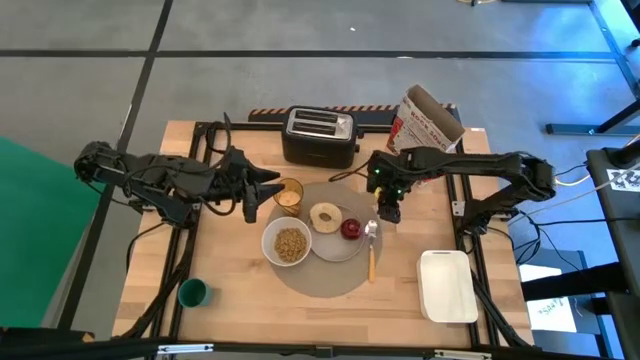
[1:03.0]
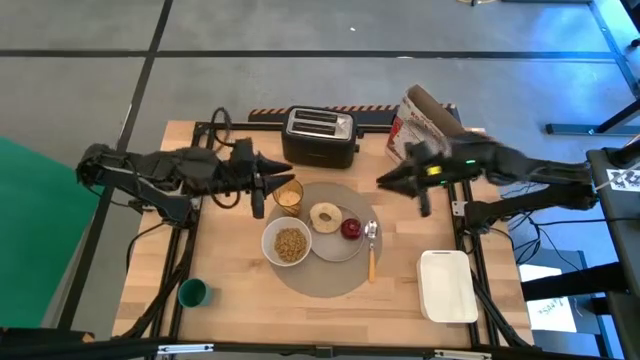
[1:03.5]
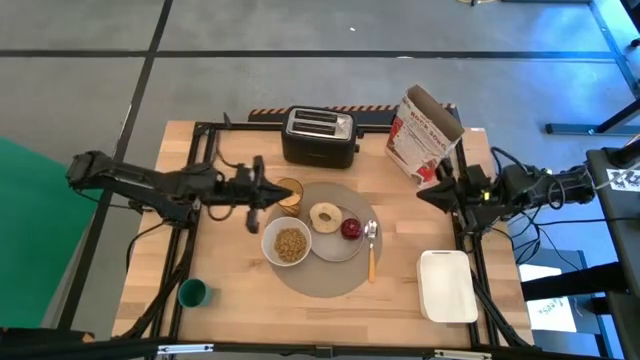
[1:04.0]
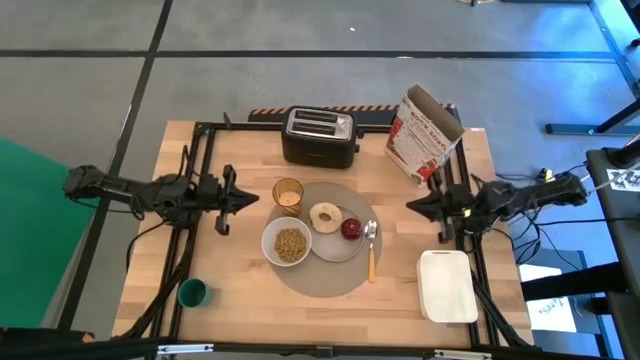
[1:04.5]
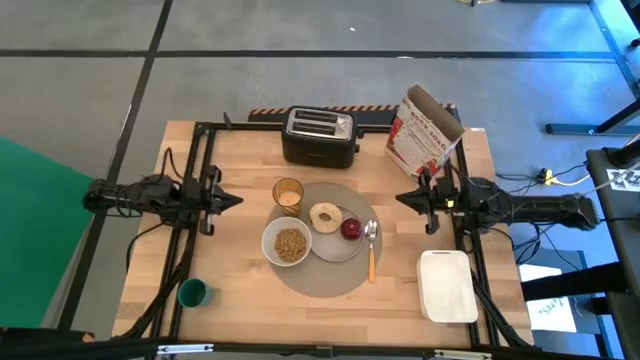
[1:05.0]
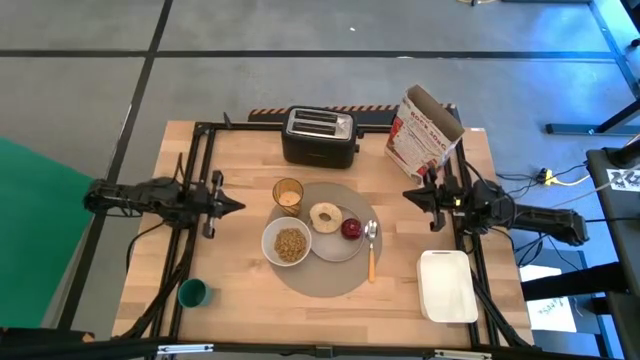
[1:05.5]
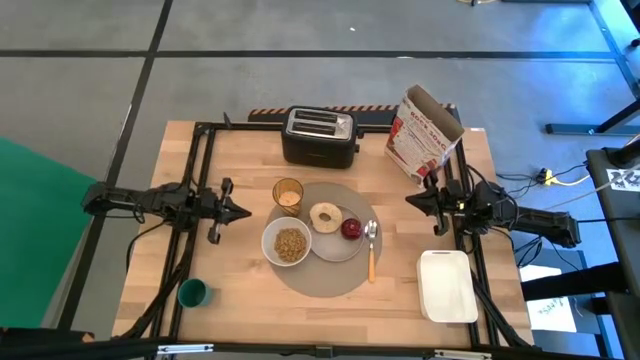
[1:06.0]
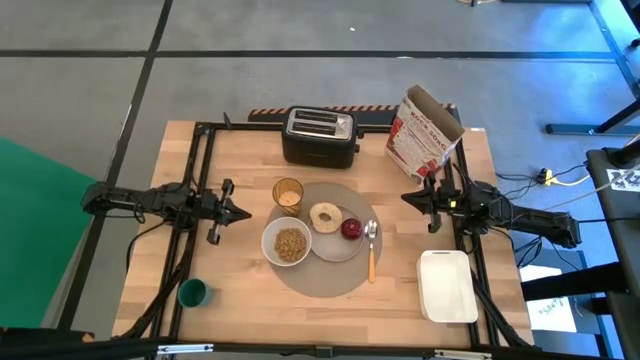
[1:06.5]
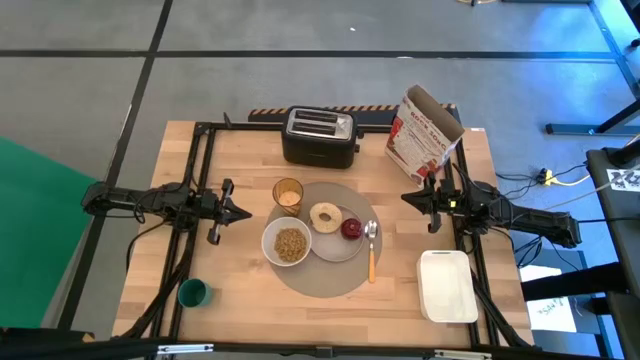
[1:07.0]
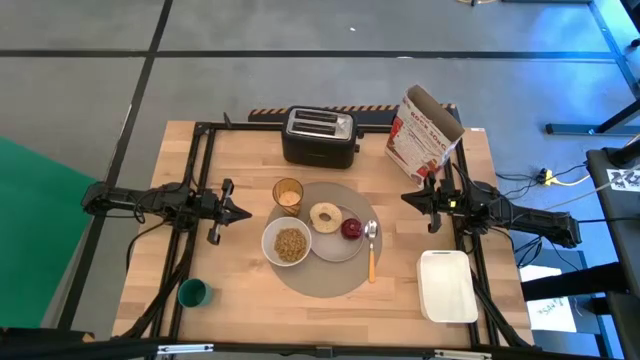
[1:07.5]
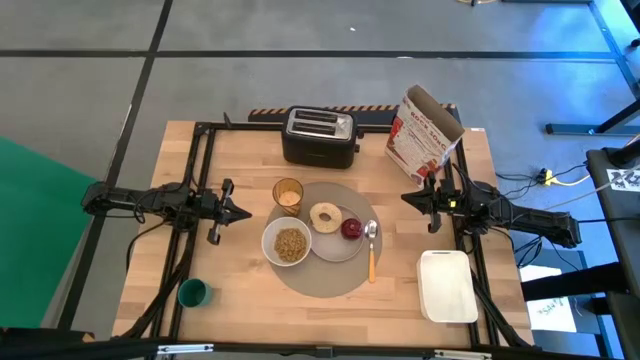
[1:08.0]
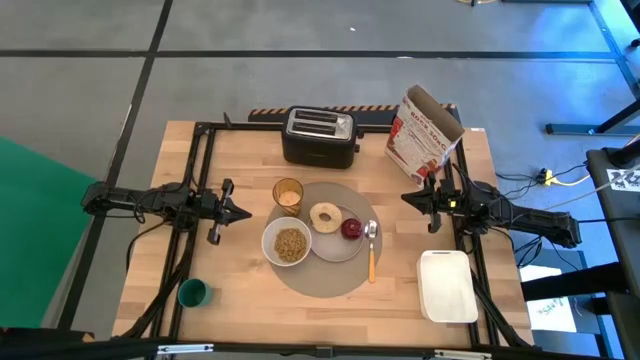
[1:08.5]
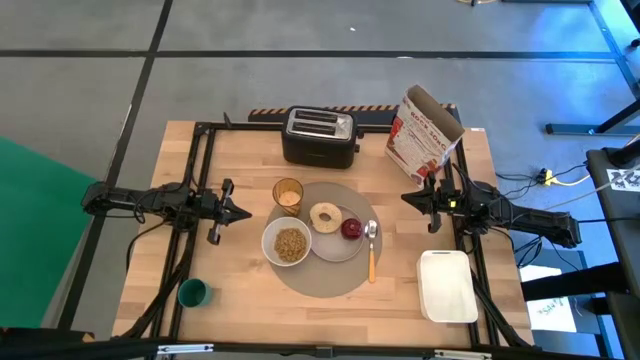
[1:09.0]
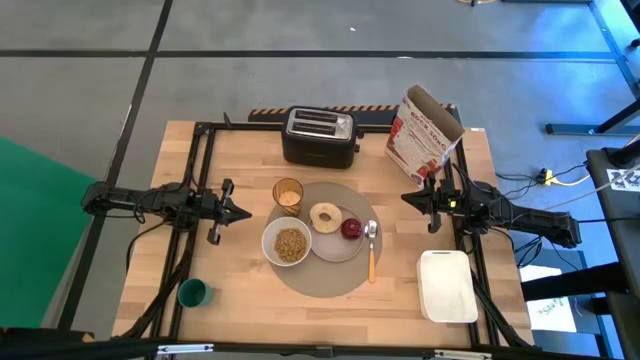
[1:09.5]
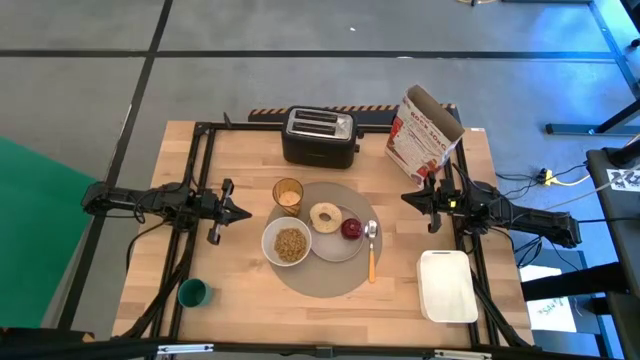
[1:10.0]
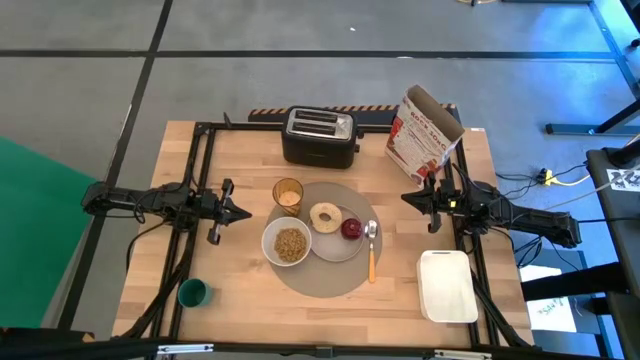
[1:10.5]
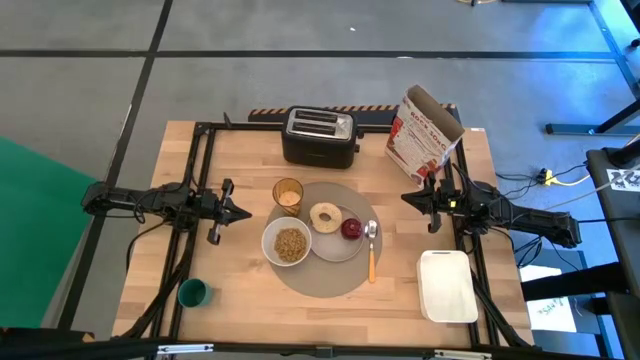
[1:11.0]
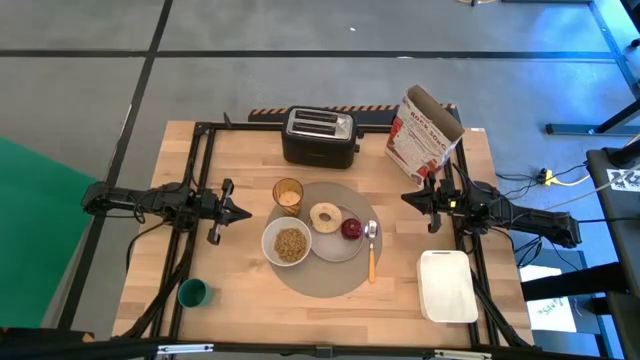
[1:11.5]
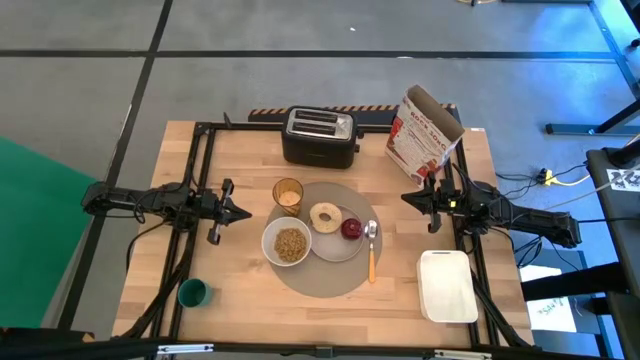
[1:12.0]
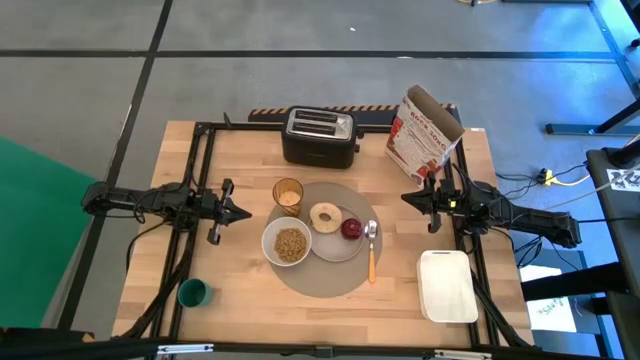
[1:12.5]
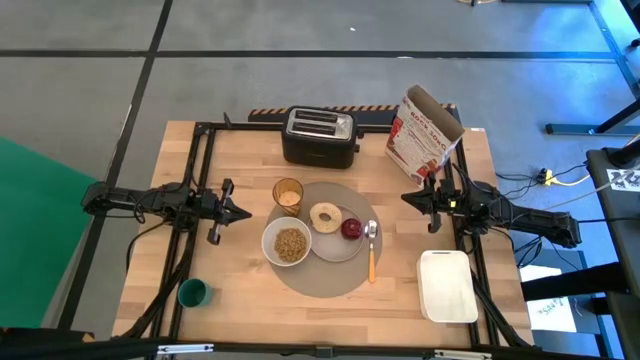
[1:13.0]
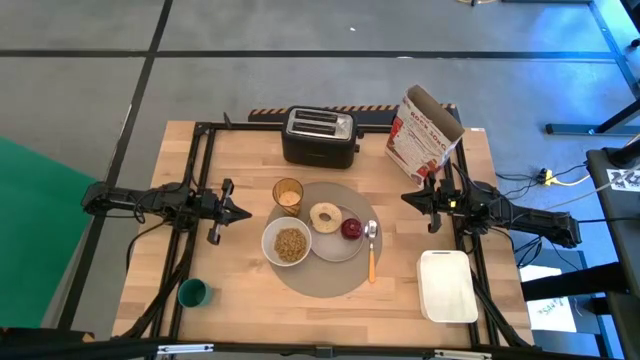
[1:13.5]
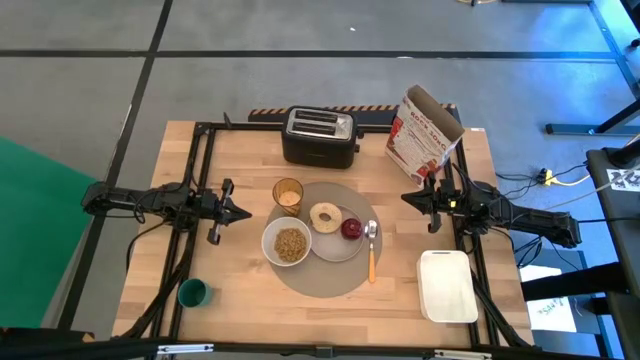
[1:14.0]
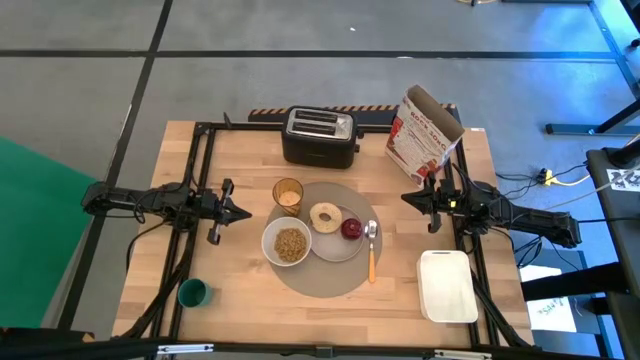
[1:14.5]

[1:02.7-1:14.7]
Task: Arrange a breakfast setting
Return to Home Position

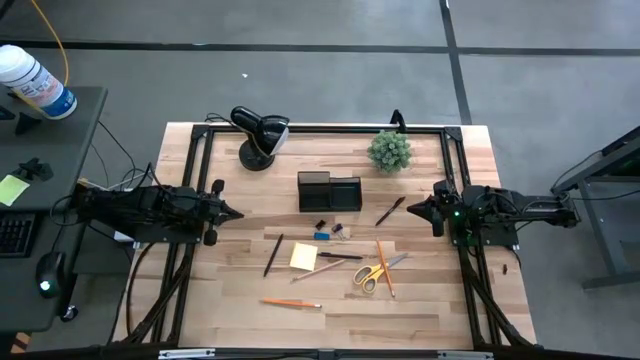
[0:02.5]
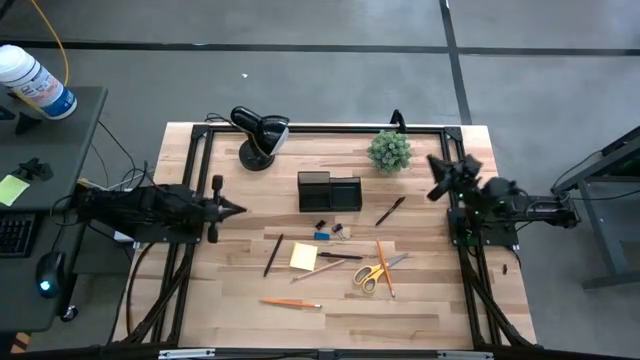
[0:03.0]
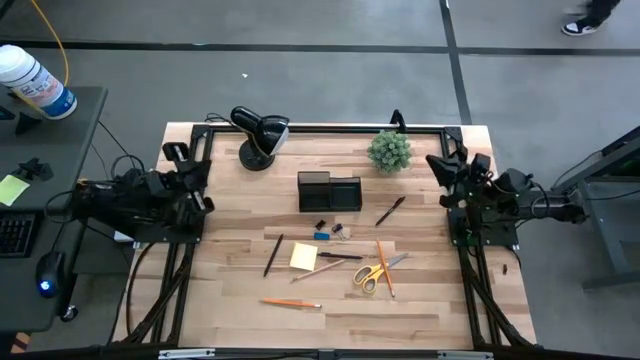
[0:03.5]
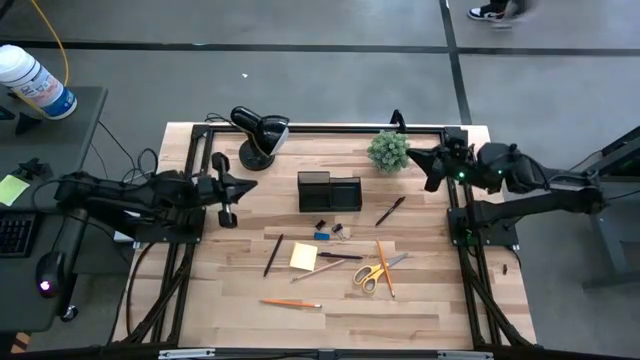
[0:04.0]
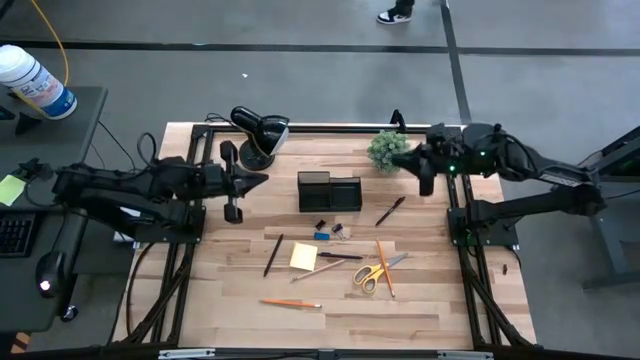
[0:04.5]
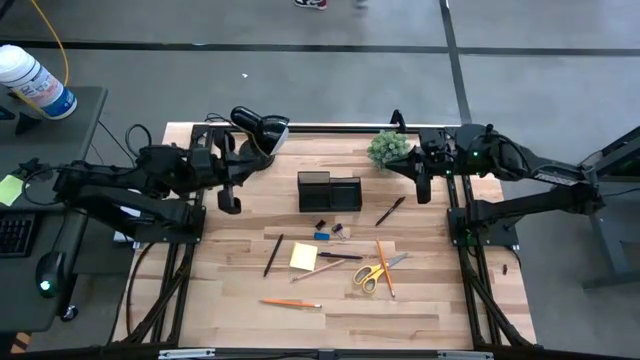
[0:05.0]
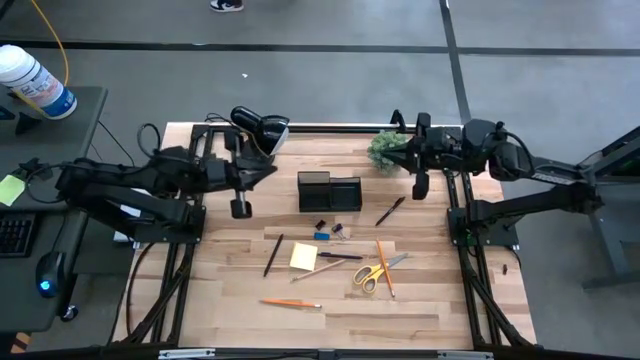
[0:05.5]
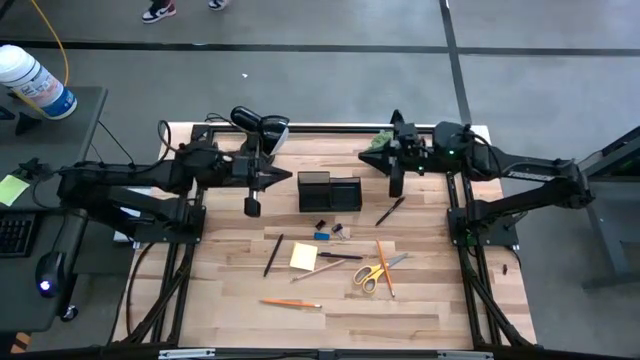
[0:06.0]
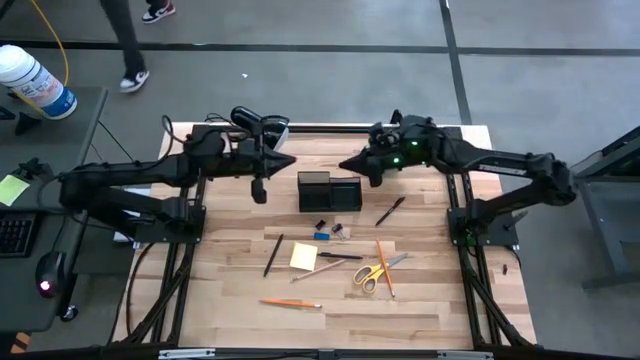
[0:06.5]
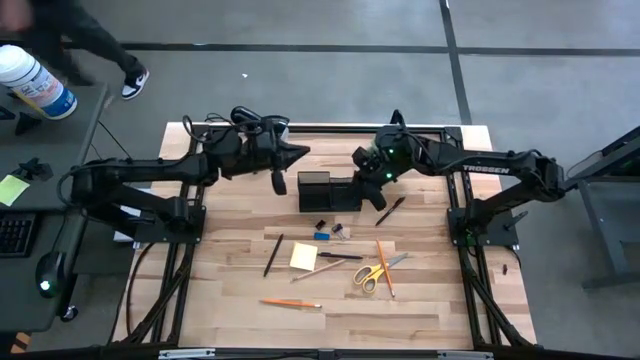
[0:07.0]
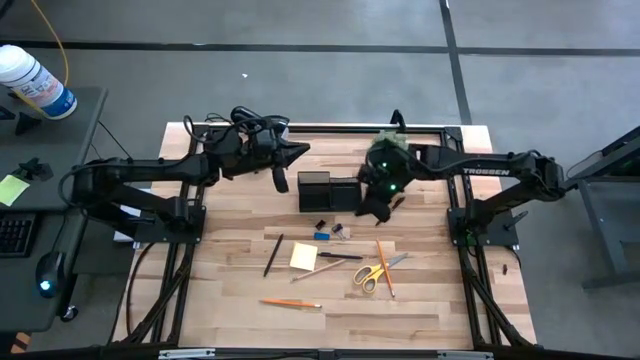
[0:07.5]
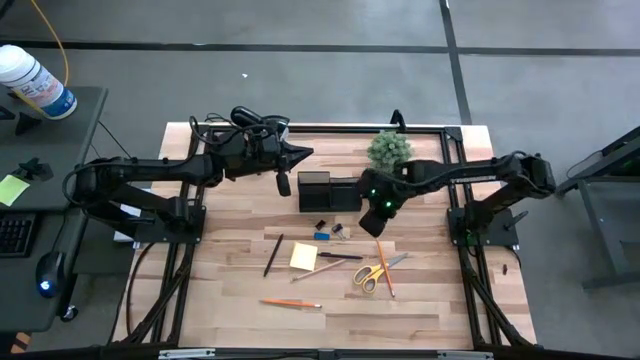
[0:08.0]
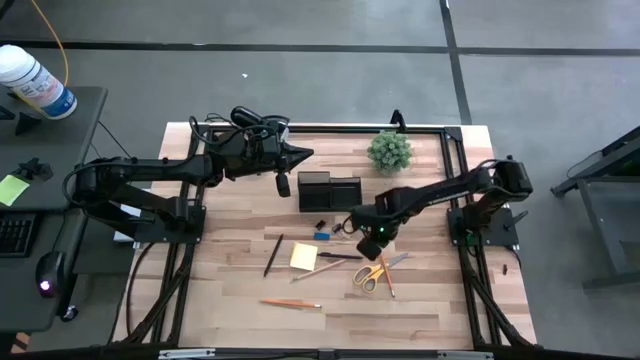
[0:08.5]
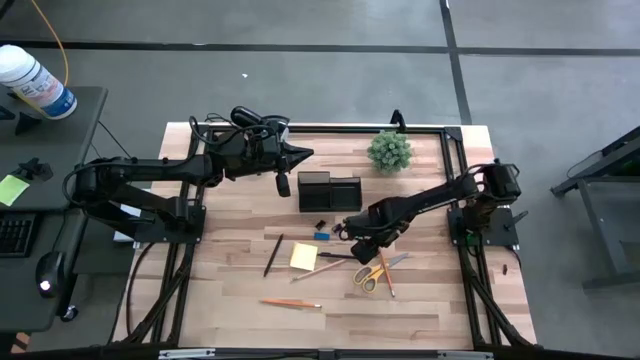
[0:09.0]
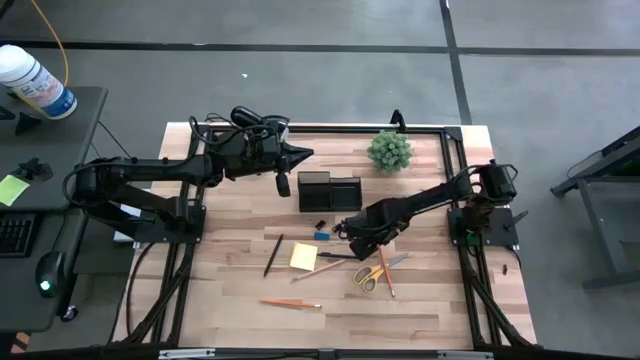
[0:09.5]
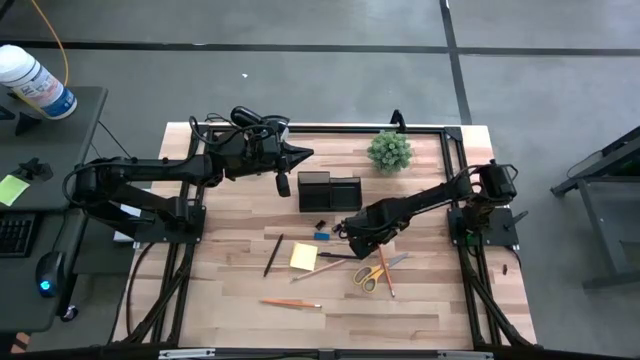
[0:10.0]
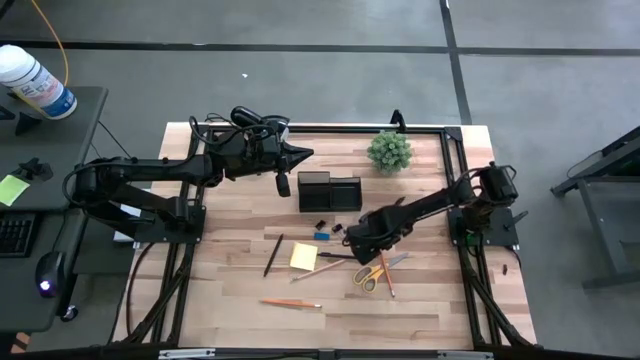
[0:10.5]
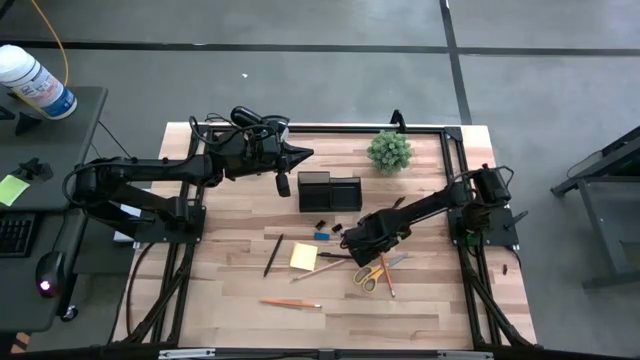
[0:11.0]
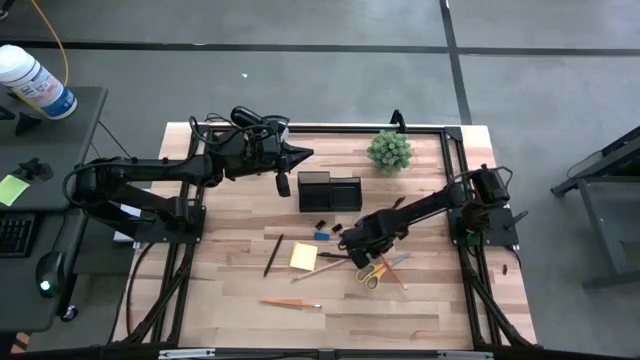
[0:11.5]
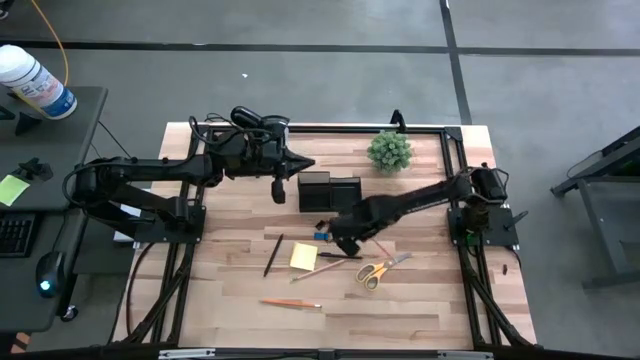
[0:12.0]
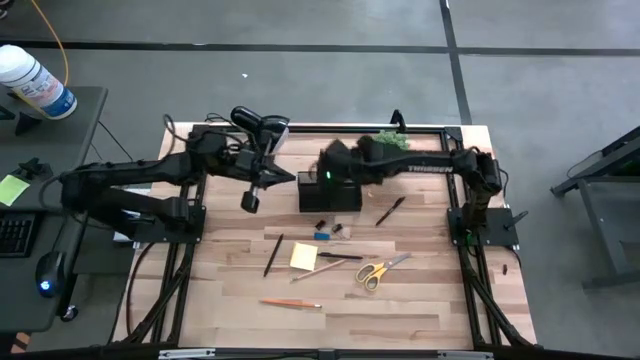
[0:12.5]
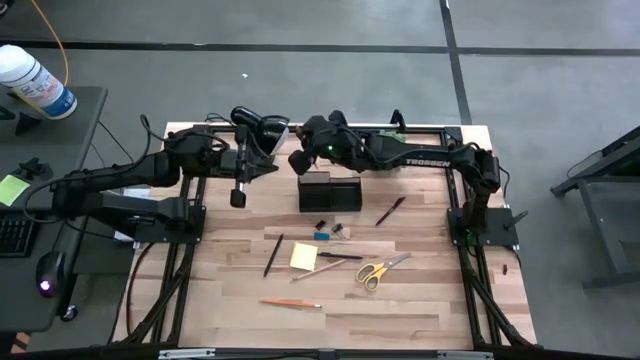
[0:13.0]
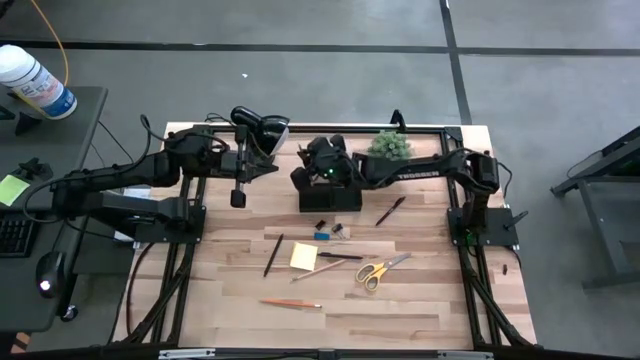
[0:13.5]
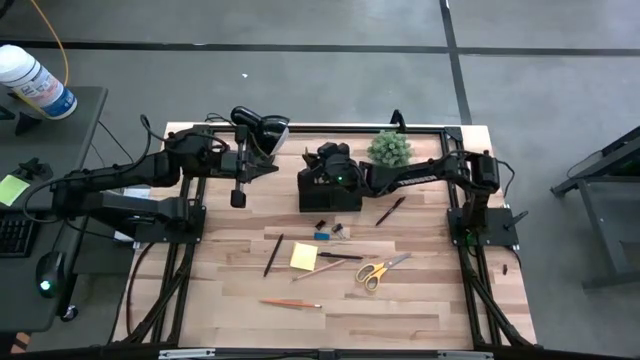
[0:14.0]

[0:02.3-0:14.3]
Task: Pick and place office supplies into organizer
Put the right orange pencil into the black desk organizer
